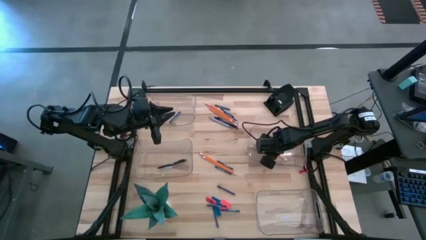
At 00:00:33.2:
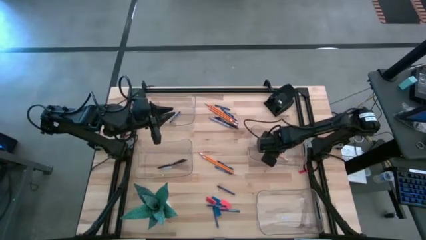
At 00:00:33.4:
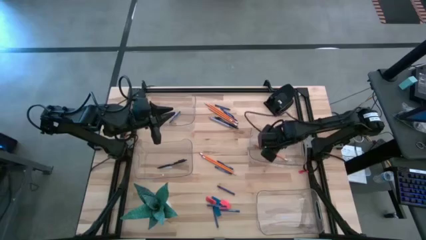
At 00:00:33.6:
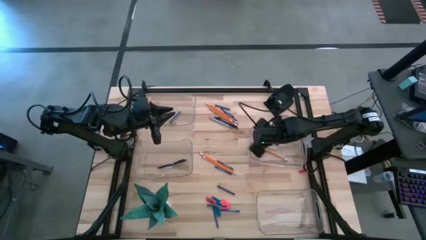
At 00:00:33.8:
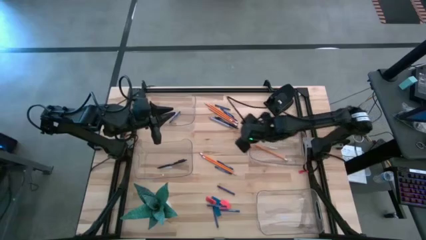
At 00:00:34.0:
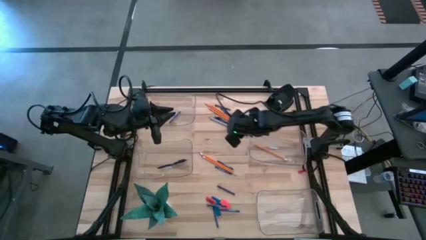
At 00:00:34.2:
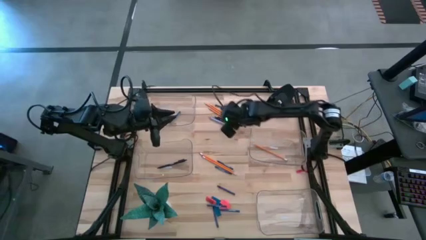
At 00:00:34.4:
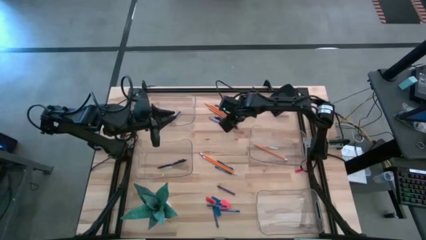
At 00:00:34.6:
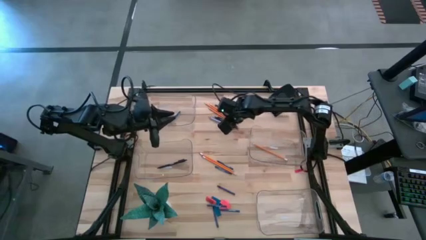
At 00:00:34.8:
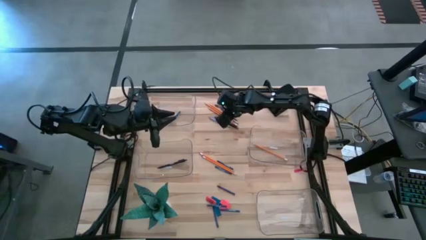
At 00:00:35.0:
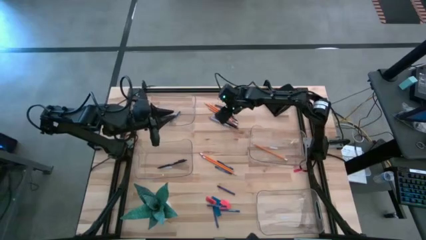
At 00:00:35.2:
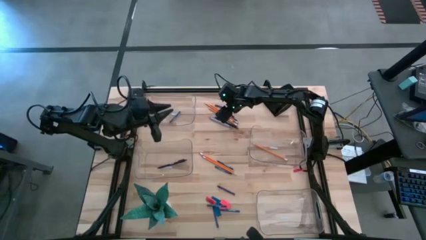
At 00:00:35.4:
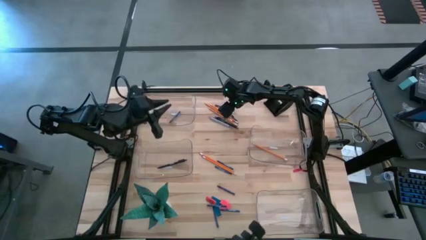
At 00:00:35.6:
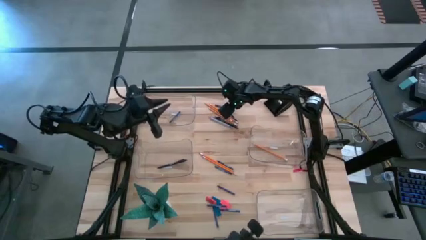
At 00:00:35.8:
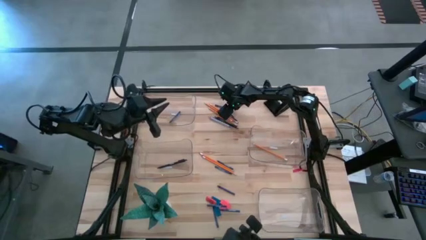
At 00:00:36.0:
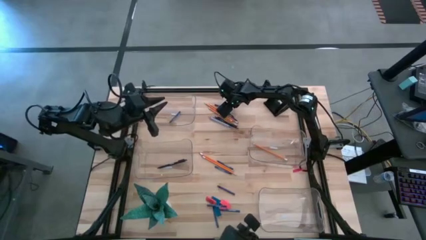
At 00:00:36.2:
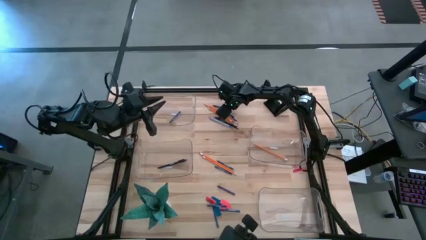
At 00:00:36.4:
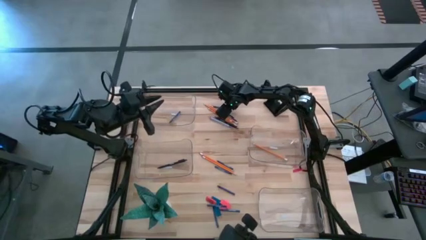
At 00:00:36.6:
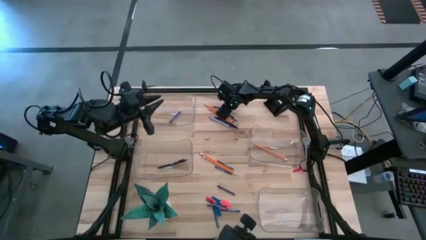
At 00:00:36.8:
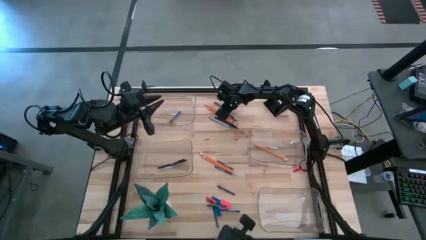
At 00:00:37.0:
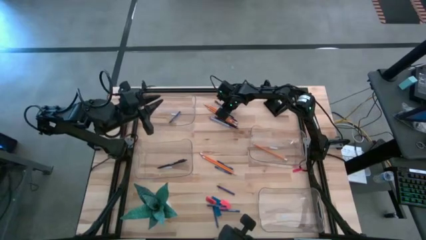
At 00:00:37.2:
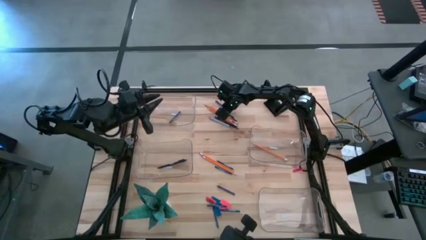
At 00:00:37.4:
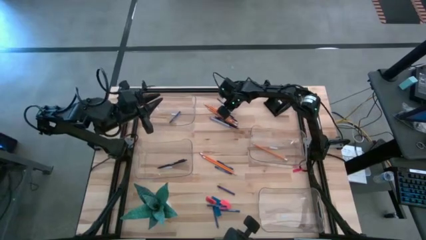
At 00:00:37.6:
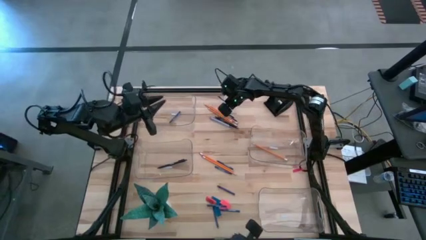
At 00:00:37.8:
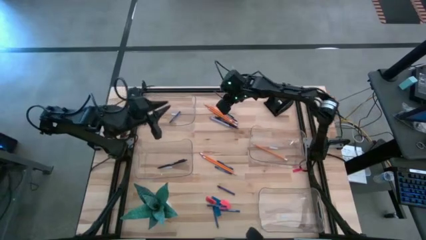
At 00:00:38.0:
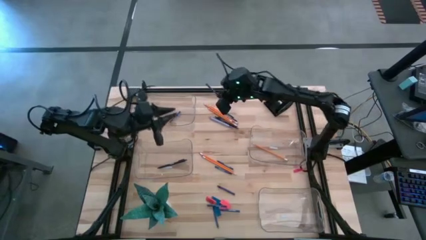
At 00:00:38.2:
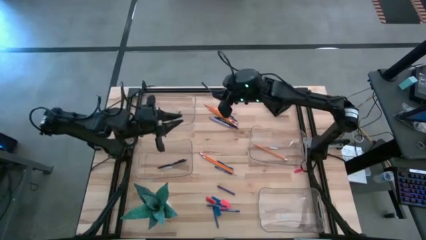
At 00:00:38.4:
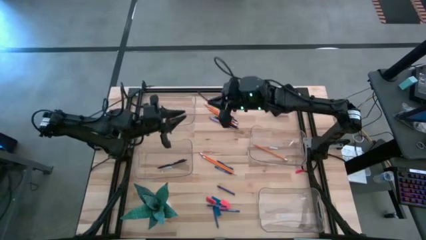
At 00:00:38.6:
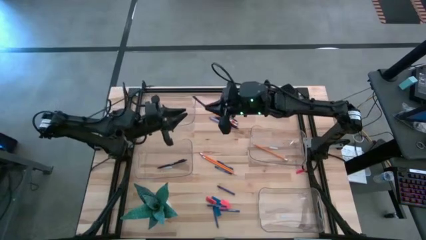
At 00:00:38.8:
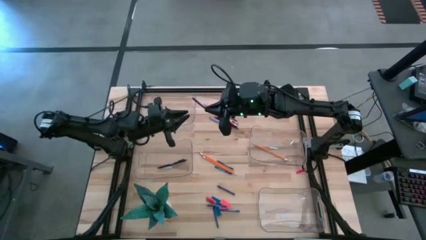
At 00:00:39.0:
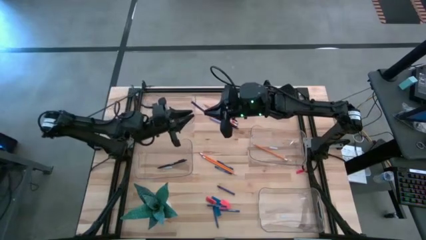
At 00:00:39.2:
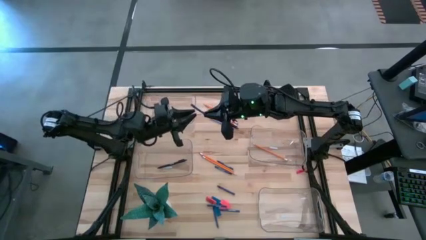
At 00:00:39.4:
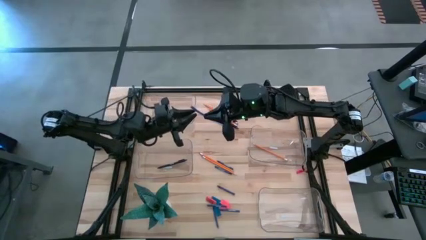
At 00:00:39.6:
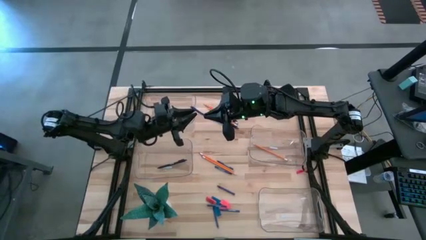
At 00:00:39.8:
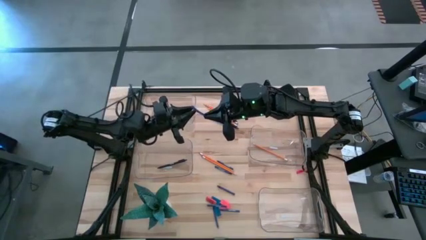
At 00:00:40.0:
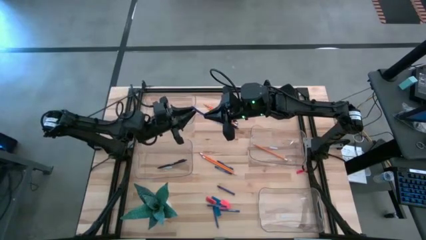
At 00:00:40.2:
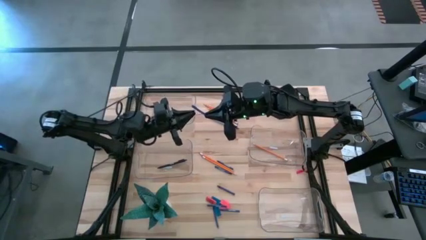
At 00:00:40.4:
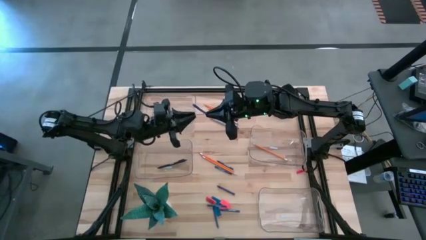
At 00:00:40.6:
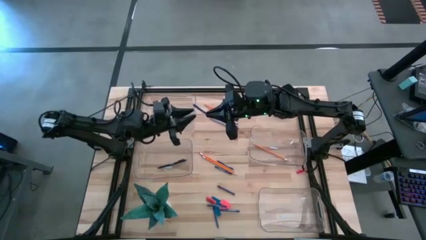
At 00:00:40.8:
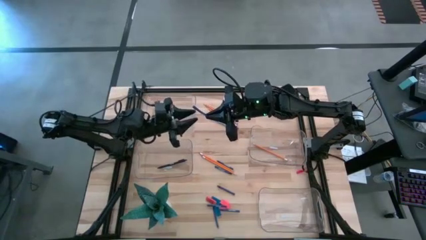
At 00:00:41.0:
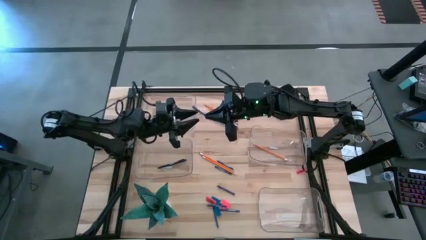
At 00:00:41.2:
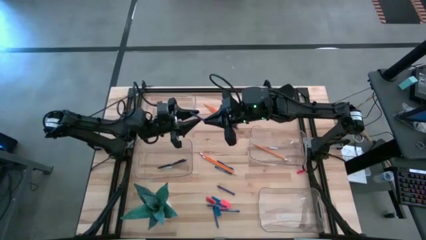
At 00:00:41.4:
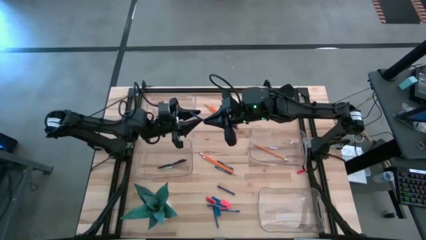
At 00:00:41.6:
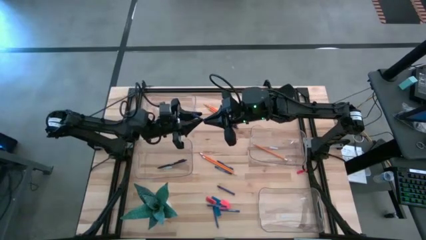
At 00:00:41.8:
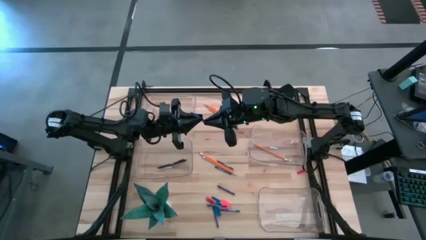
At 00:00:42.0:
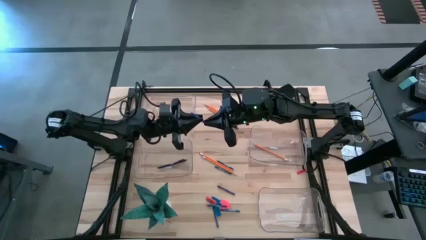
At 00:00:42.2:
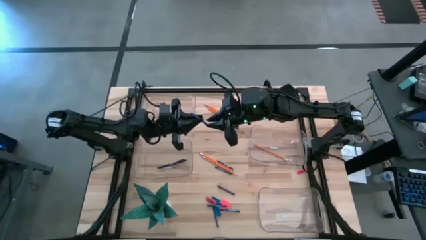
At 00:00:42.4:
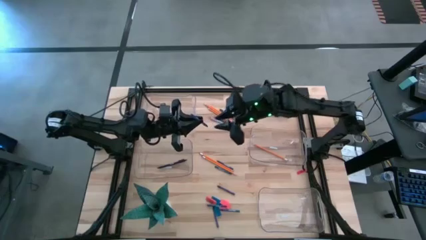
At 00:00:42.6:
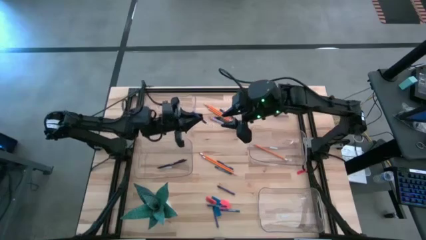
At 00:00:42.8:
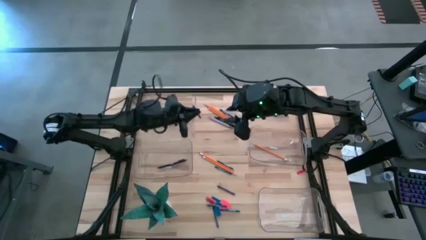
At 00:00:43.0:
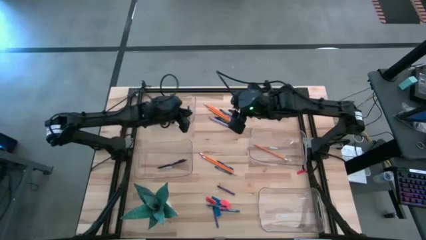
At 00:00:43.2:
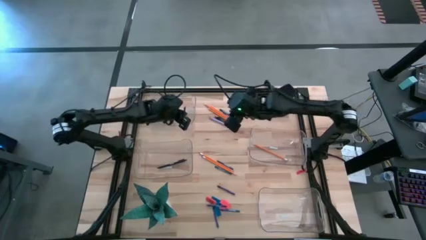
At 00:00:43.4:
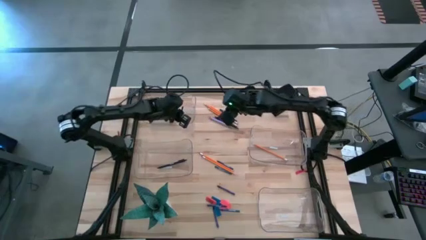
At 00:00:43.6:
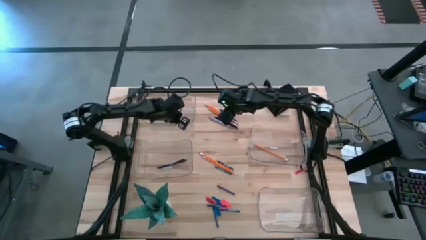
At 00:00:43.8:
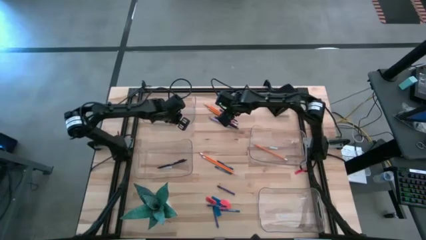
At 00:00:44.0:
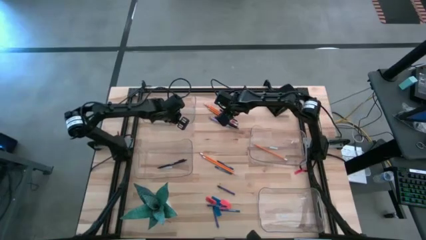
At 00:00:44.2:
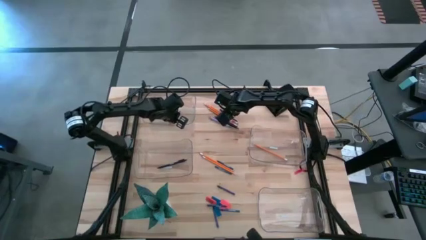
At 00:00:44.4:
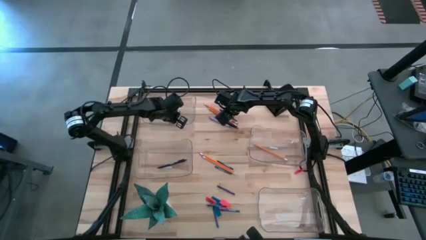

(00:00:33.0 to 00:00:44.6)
Task: Sort crayons/erasers/pens/pencils in bins
Put the blue crayon into the top transparent bin

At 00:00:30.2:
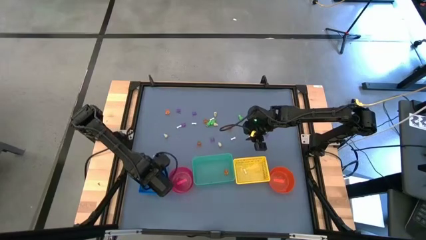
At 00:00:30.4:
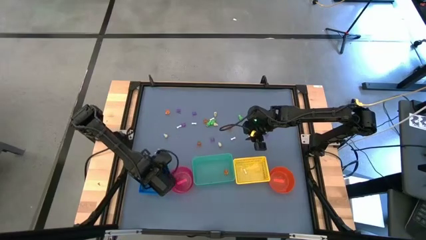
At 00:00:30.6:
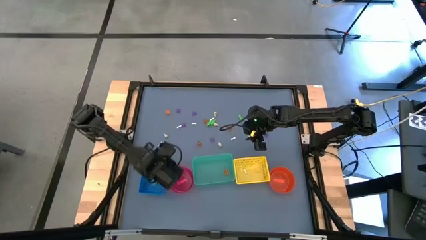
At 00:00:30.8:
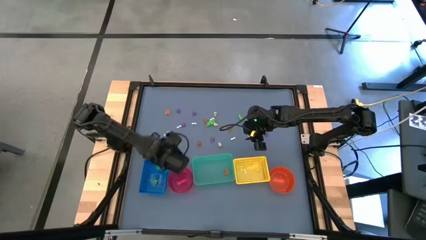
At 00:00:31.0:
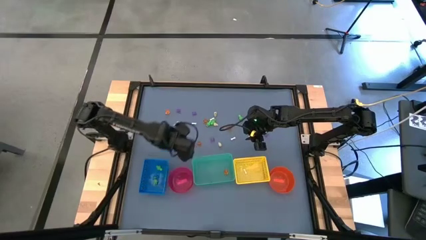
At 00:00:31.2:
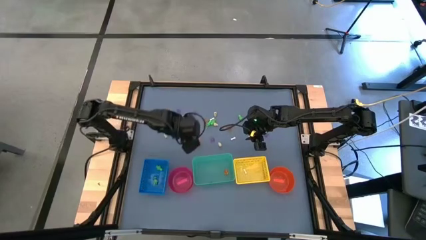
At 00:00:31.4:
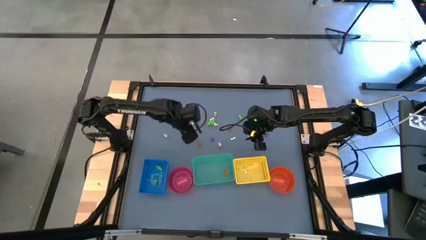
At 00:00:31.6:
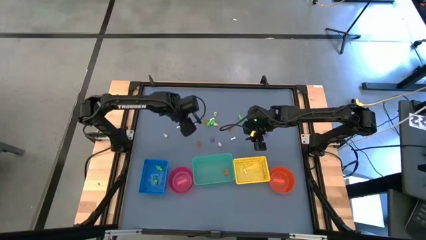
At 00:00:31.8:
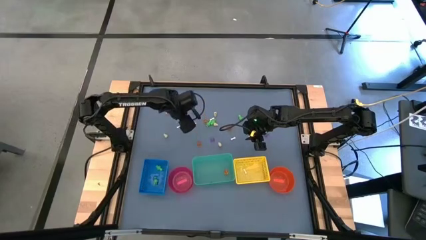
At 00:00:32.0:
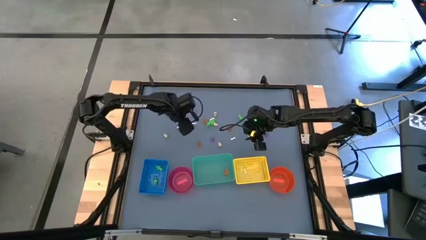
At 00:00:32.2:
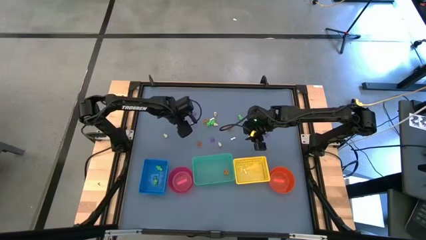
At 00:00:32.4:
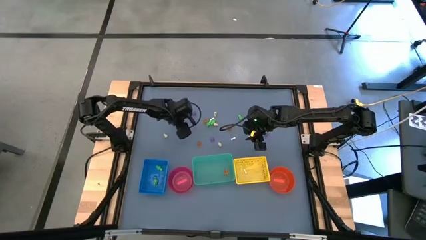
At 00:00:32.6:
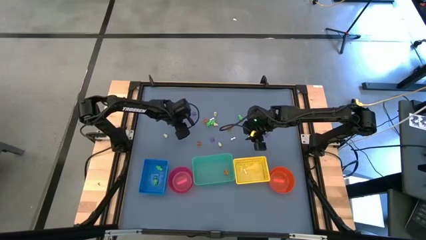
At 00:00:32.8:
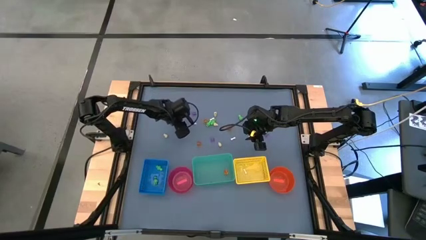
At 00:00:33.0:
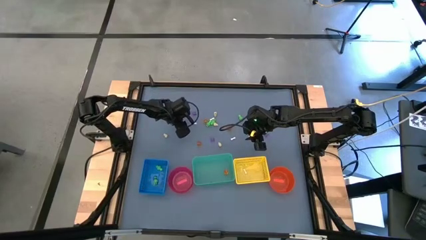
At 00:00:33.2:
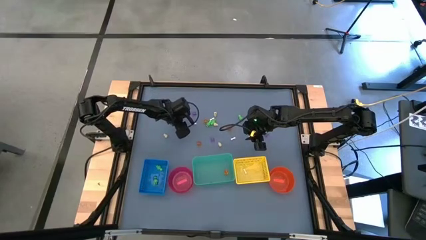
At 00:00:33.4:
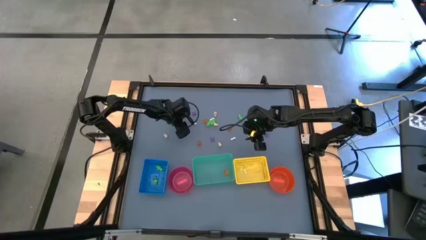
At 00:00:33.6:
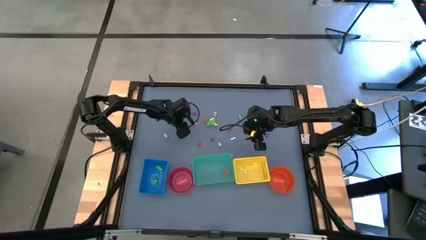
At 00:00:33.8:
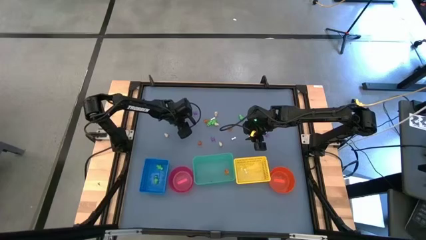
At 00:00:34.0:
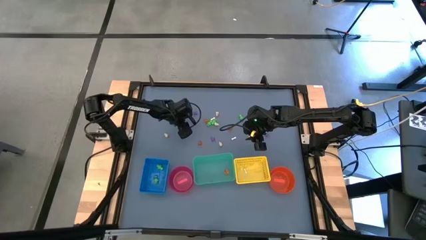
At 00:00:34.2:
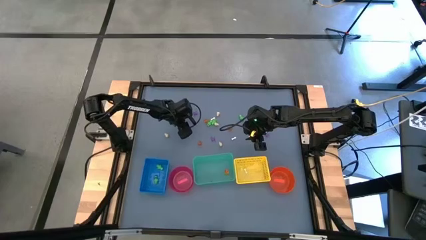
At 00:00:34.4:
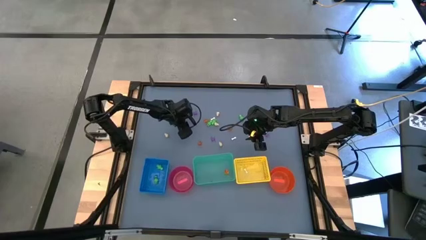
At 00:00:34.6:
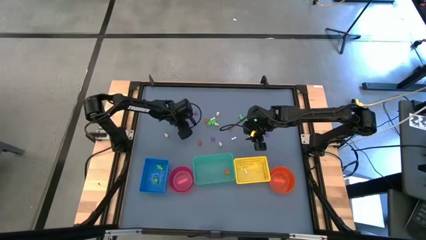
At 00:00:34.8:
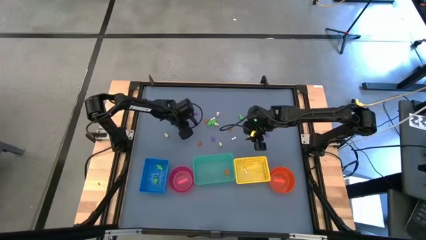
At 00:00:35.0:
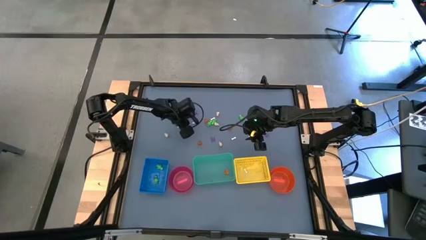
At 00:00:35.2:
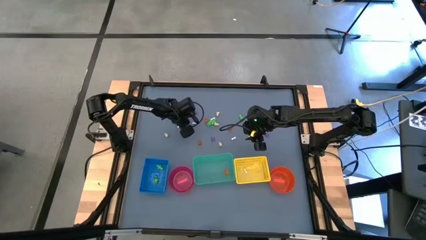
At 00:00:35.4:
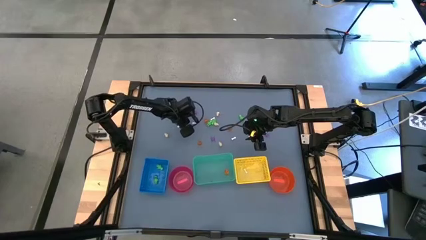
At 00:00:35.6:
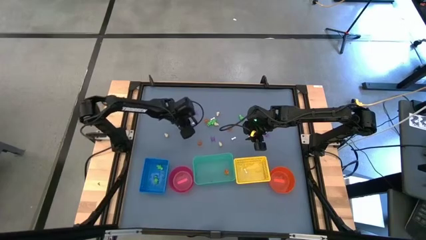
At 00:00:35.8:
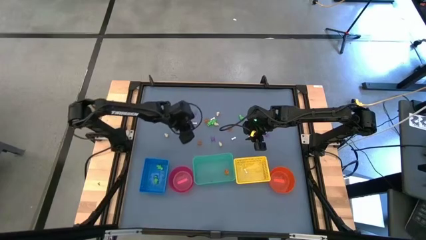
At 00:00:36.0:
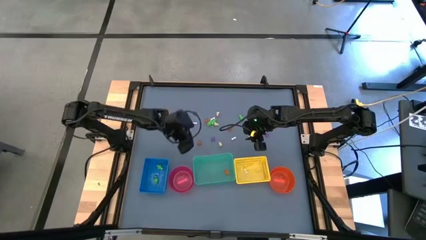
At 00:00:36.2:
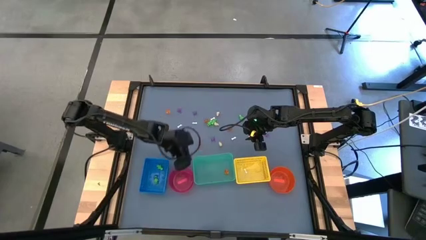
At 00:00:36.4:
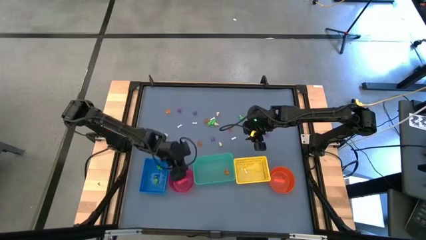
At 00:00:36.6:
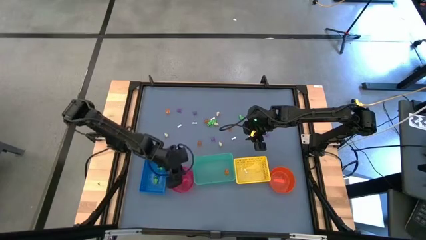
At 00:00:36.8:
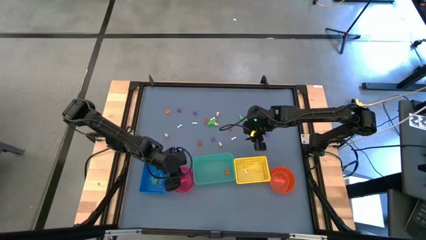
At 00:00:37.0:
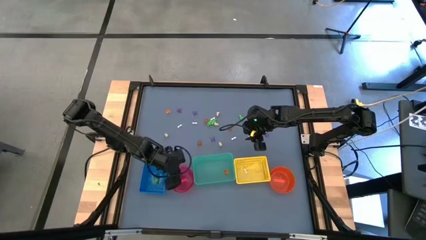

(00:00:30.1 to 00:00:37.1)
Task: Sort Halloween decoration
Put the purple spider toy into the pink bin
